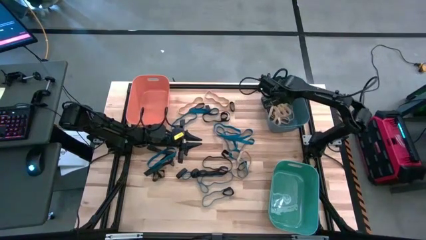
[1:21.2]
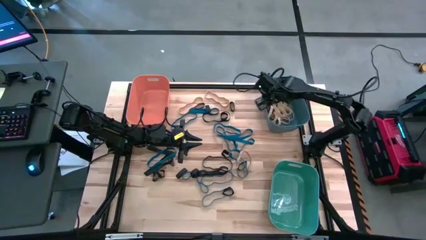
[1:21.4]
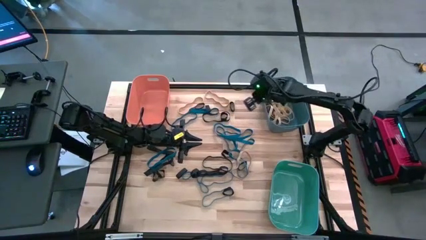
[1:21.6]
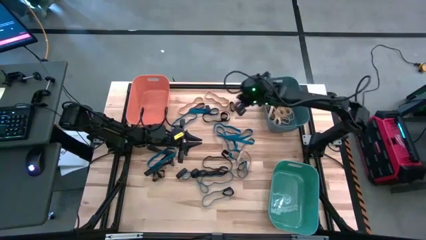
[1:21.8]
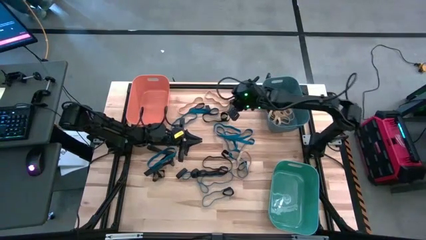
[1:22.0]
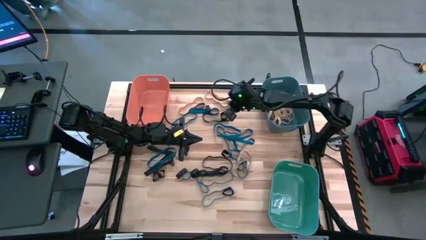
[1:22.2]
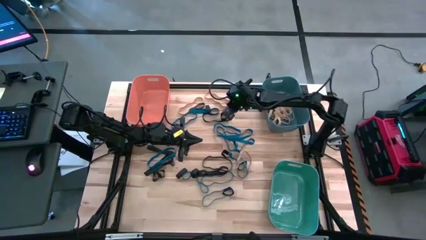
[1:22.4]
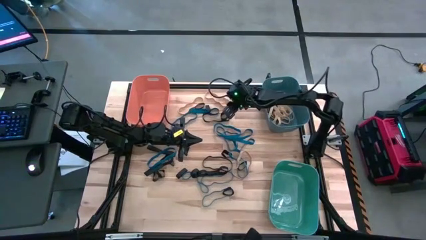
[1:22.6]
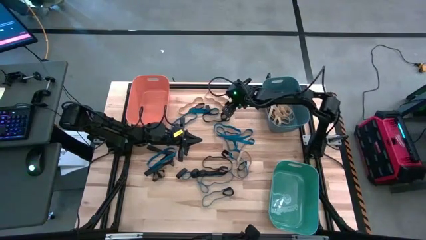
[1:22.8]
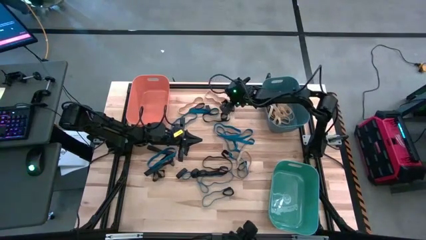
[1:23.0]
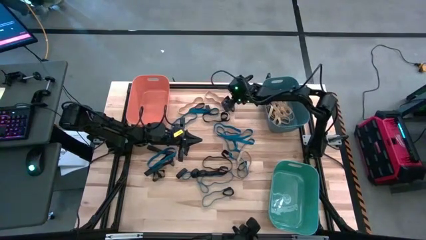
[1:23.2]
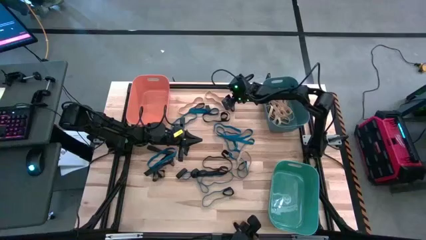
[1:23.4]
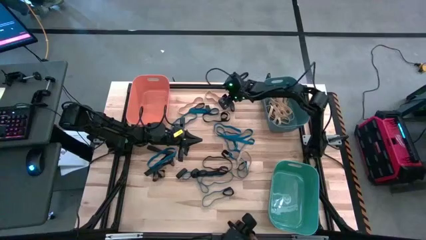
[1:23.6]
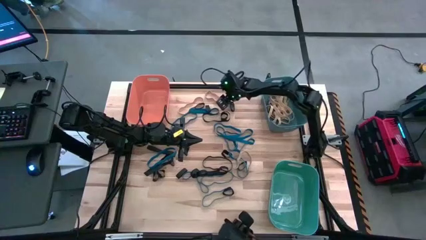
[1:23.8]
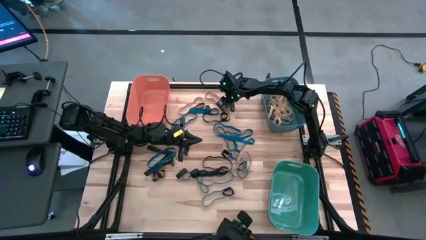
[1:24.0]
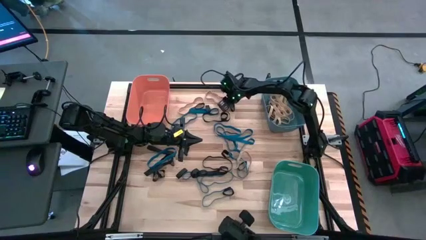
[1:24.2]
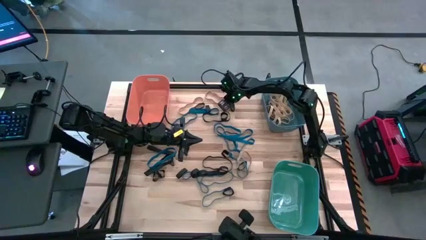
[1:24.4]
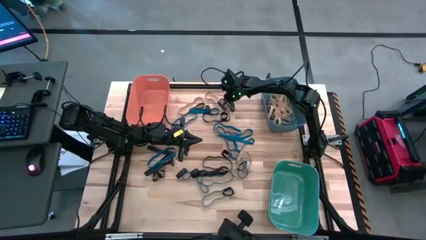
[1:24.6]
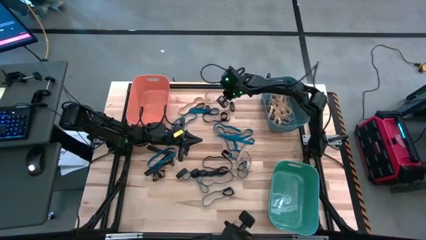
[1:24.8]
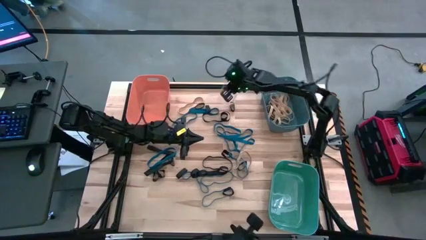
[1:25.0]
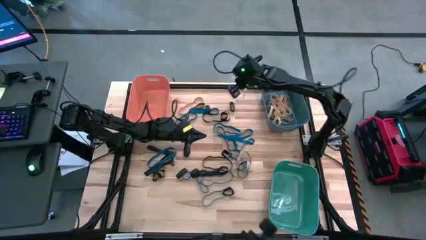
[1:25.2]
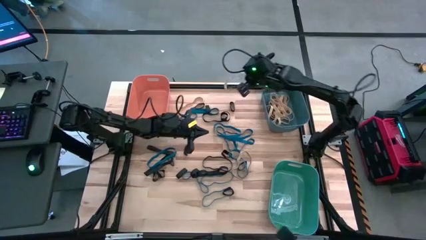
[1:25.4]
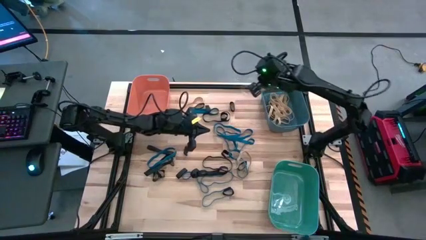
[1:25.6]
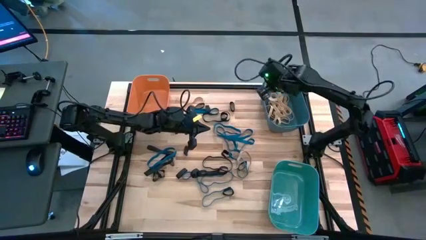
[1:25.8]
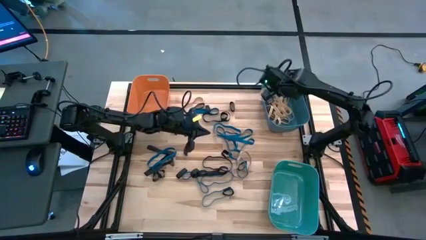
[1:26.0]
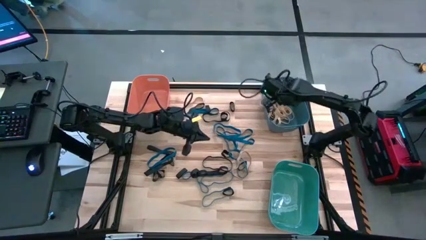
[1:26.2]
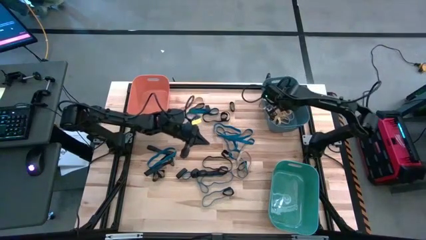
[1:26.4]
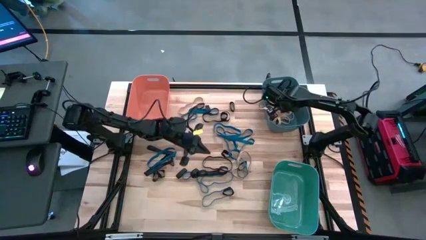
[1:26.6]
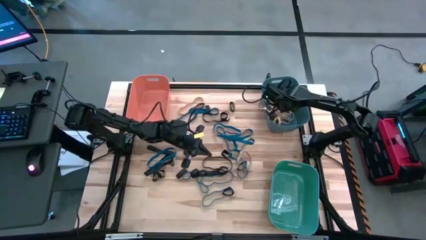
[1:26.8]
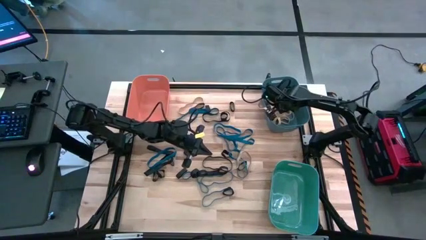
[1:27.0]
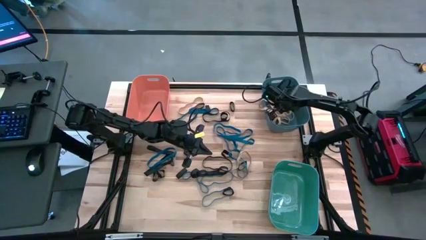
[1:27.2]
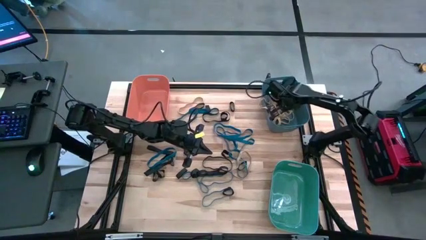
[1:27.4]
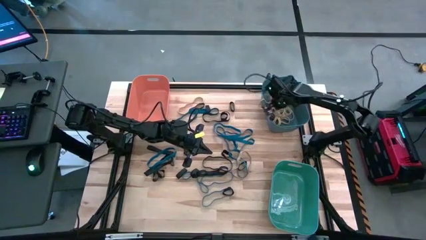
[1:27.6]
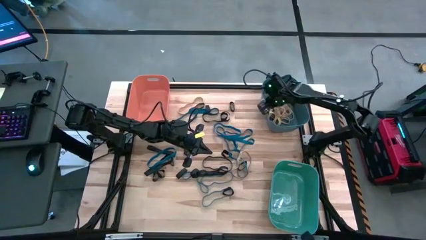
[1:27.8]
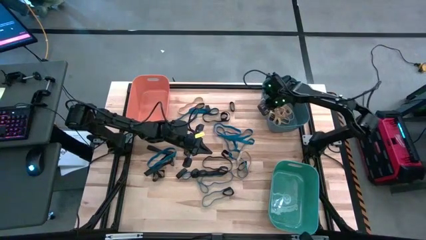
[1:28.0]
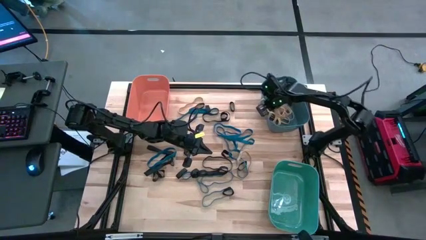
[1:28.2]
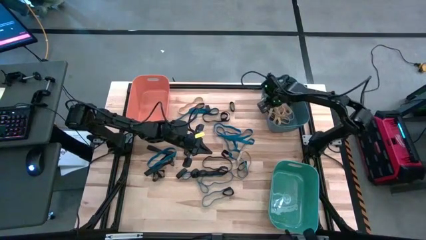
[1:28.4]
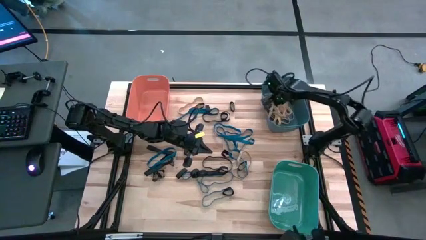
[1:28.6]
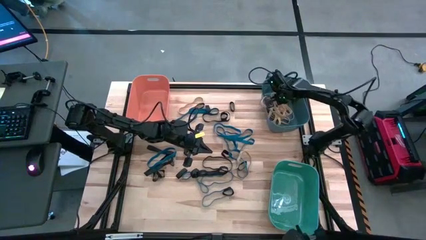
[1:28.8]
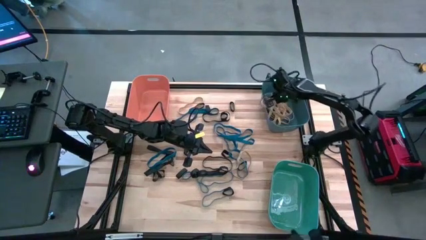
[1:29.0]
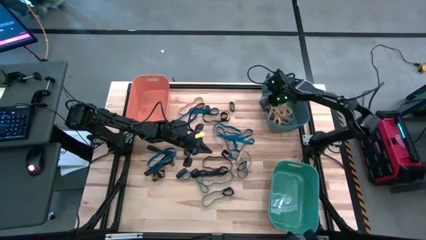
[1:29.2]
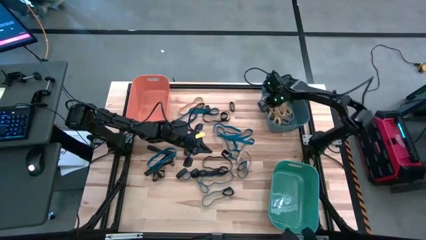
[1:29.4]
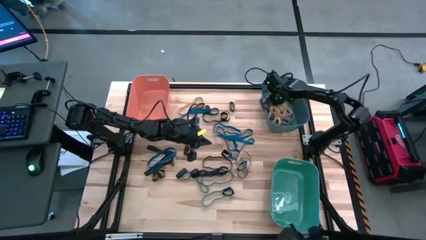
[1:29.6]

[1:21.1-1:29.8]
Task: Sort rubber bands into baskets
Put the white rubber band into the blue bin

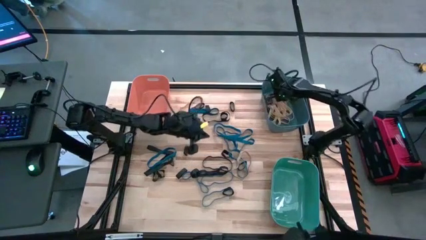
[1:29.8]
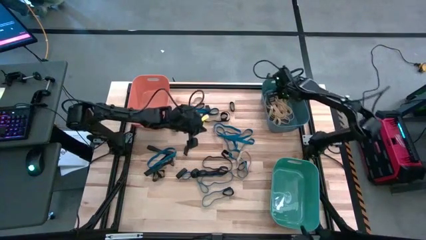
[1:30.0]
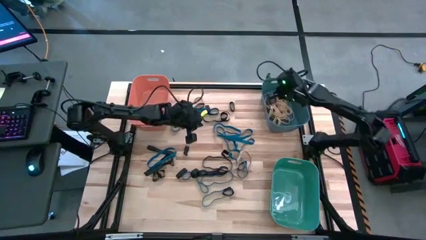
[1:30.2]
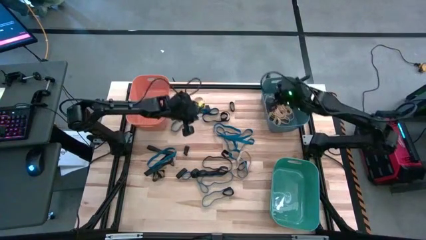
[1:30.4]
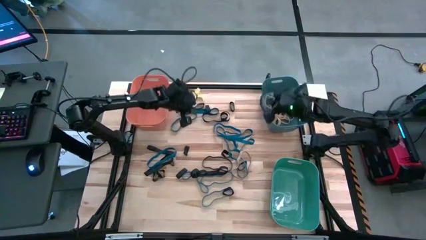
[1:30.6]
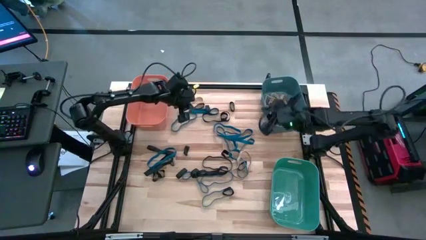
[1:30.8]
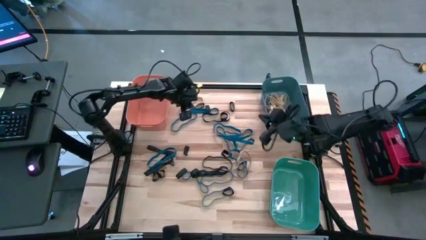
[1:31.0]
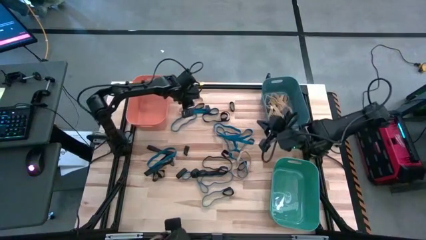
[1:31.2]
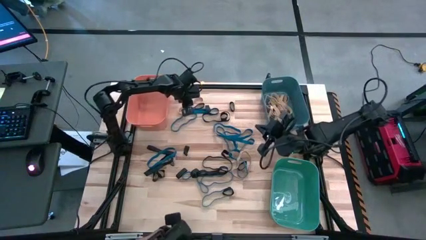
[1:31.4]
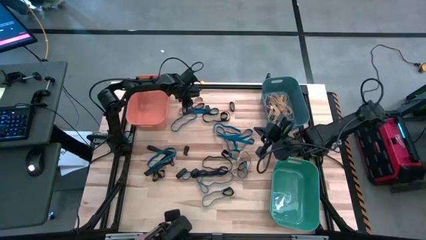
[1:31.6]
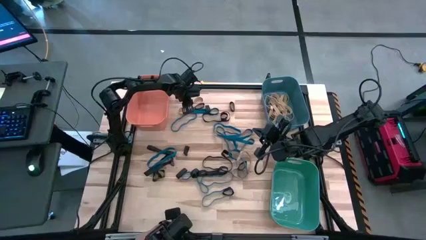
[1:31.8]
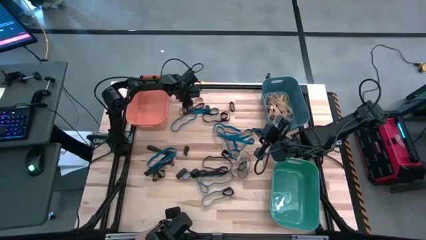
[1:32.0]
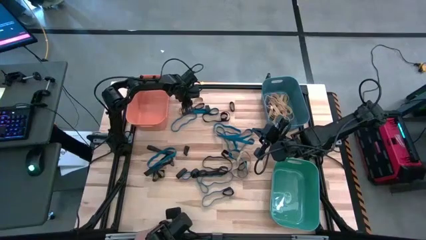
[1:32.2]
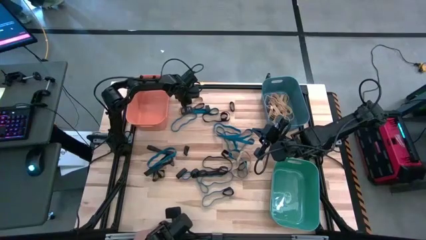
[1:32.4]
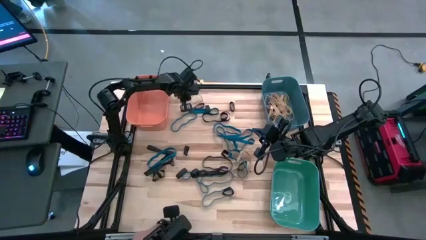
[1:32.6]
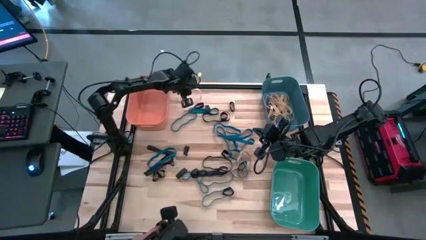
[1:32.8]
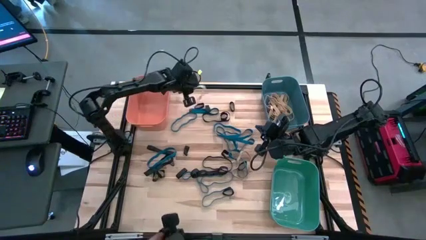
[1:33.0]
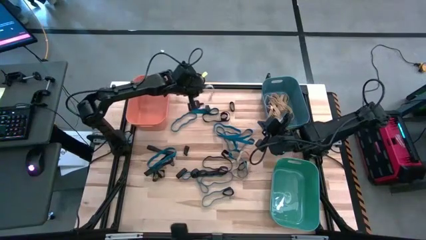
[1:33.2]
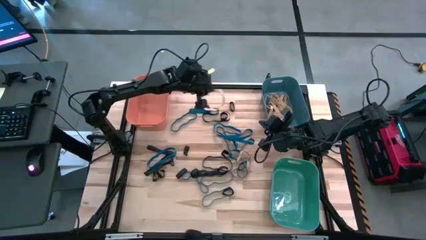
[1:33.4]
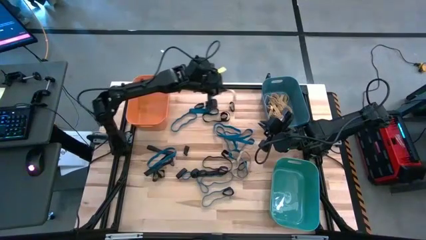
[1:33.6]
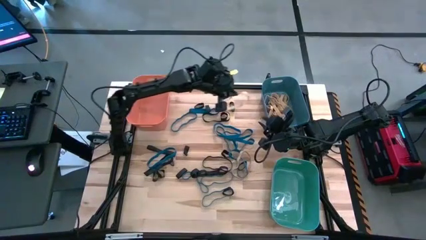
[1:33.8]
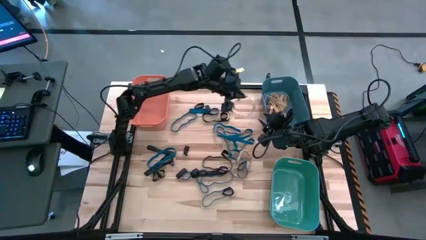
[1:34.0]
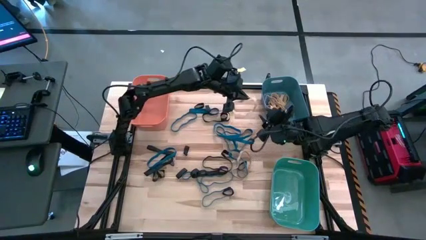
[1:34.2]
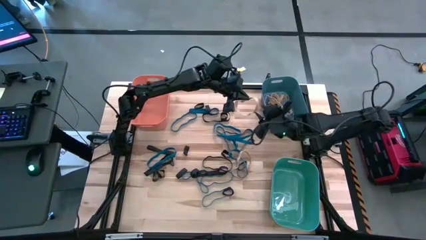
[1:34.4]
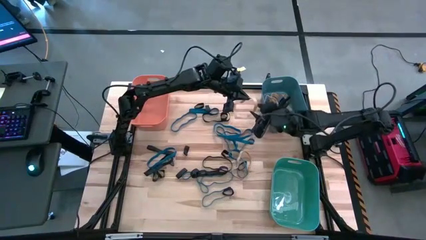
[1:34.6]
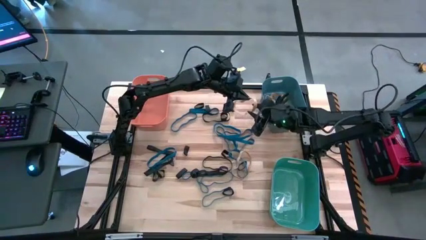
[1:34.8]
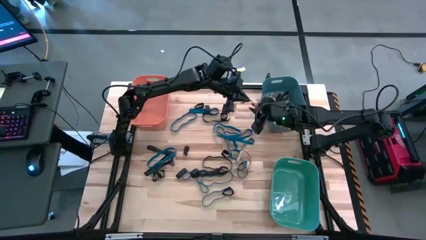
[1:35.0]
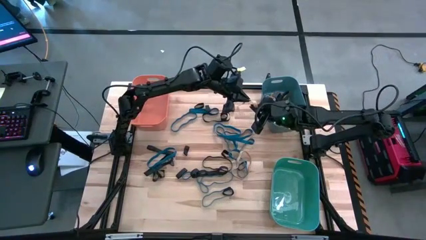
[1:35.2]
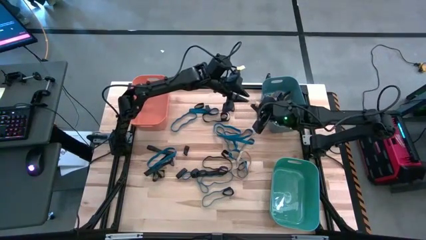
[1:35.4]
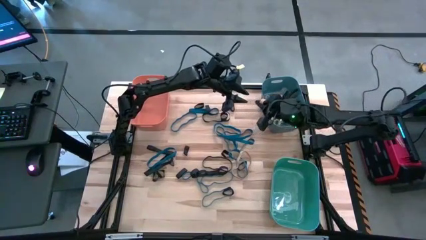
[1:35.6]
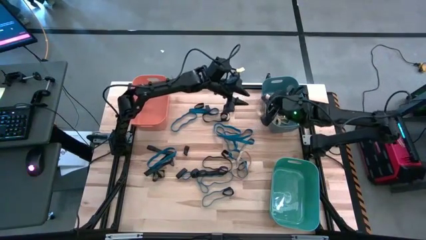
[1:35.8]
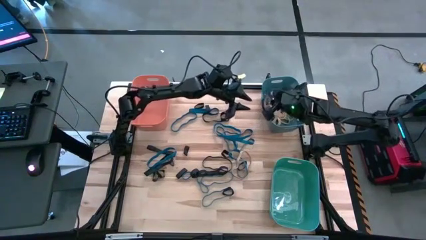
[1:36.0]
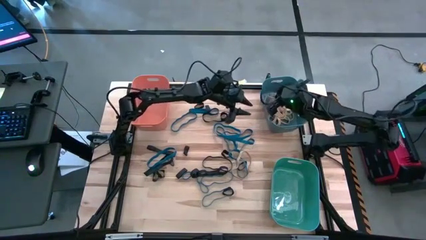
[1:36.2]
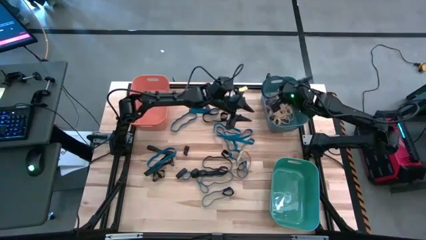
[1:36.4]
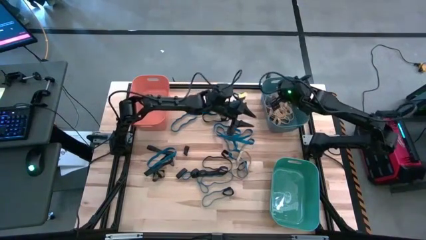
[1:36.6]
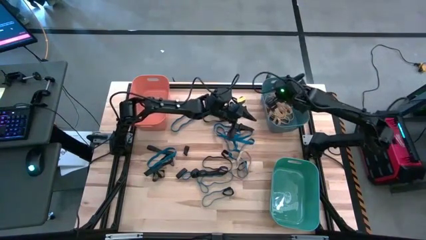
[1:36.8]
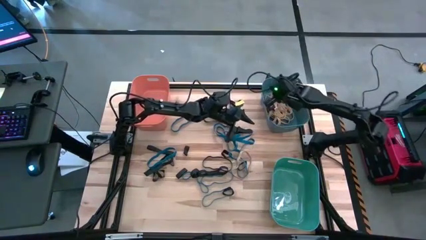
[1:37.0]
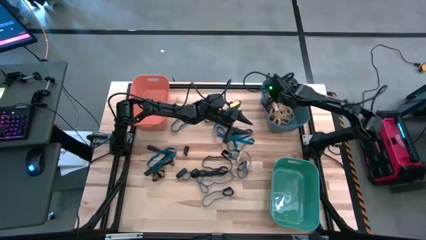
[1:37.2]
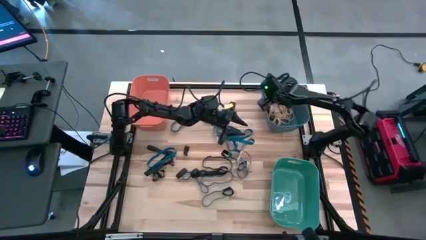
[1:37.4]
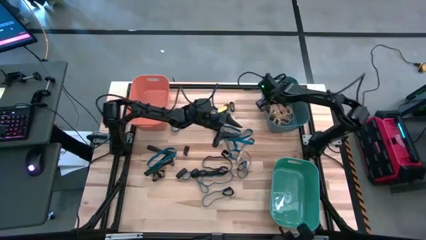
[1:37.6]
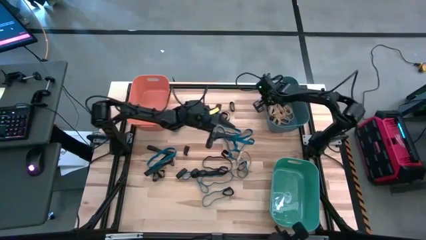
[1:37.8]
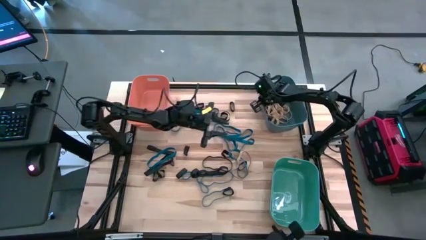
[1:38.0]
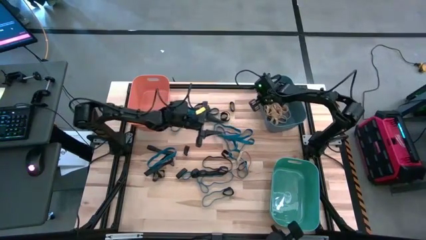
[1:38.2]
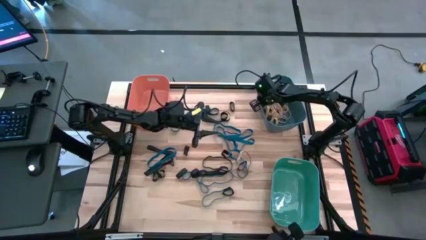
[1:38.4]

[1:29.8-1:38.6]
Put the white rubber band into the blue bin
